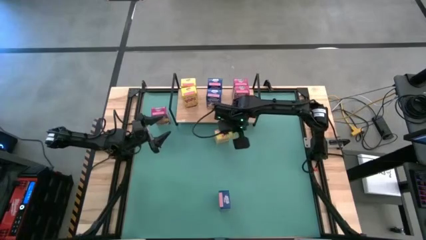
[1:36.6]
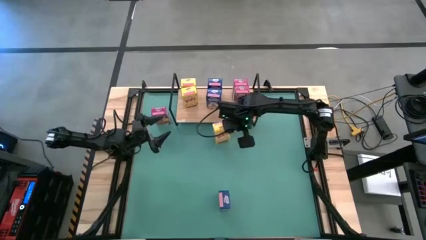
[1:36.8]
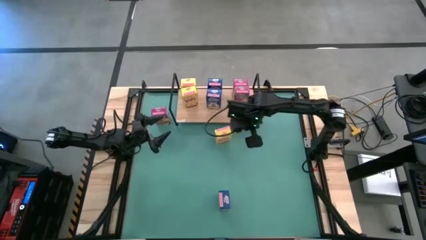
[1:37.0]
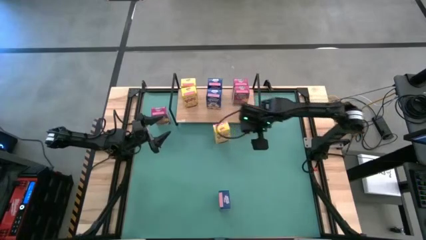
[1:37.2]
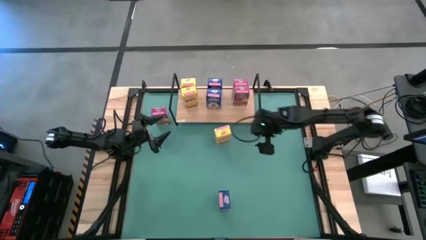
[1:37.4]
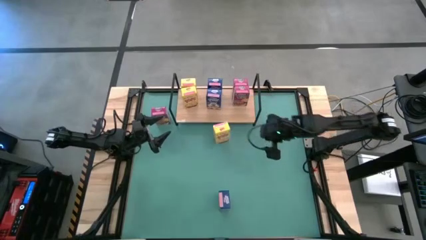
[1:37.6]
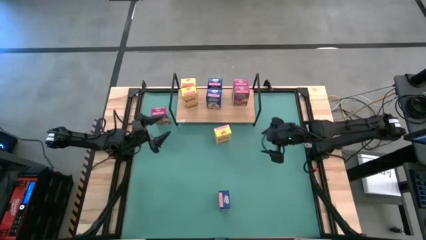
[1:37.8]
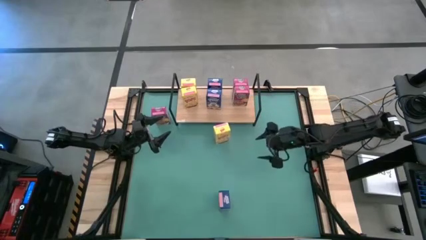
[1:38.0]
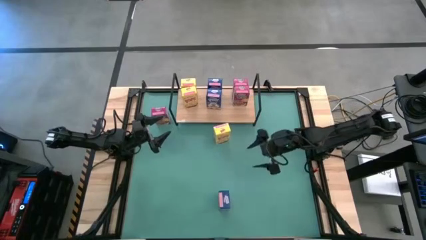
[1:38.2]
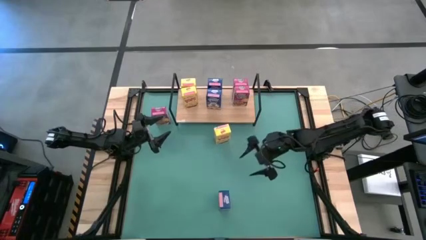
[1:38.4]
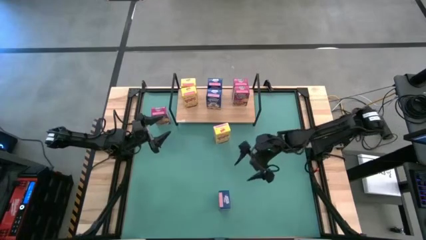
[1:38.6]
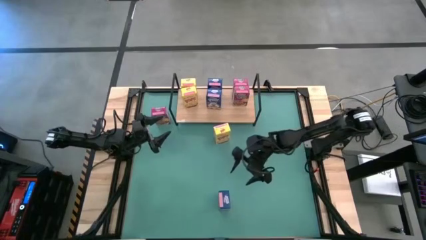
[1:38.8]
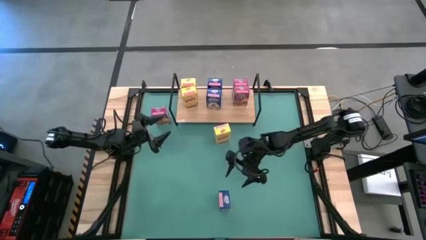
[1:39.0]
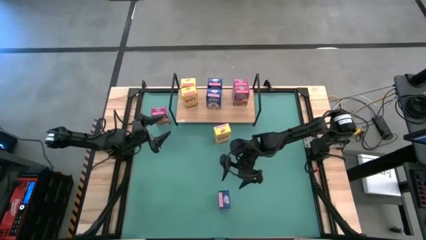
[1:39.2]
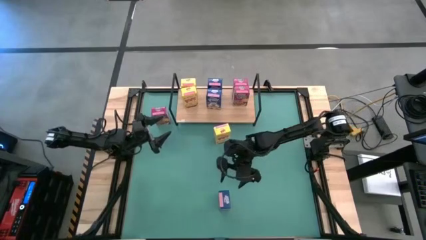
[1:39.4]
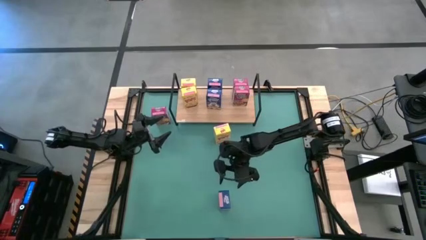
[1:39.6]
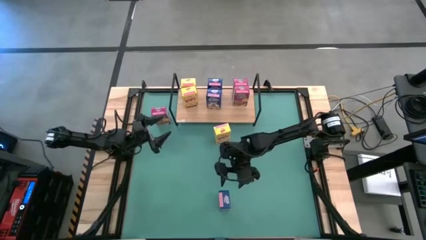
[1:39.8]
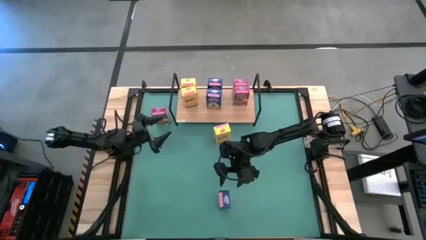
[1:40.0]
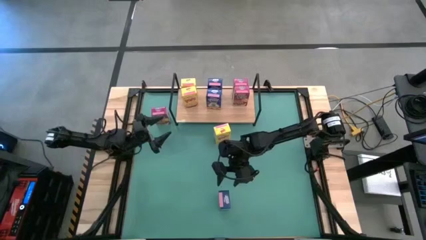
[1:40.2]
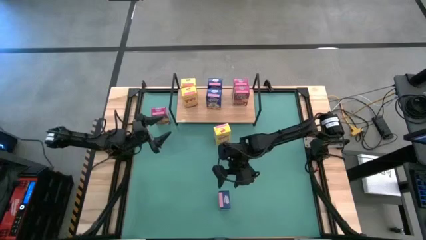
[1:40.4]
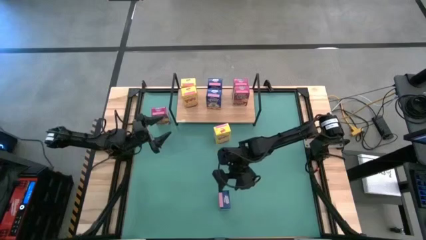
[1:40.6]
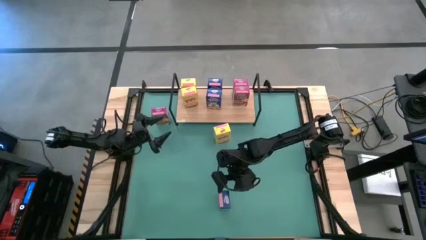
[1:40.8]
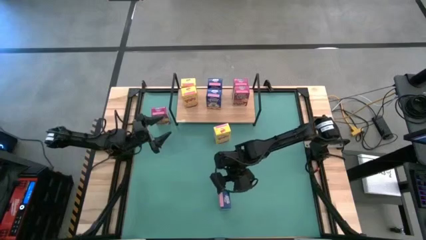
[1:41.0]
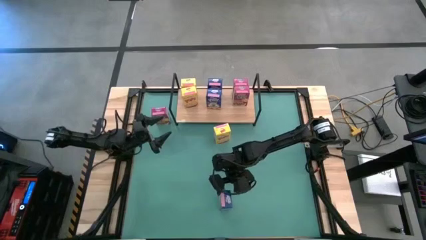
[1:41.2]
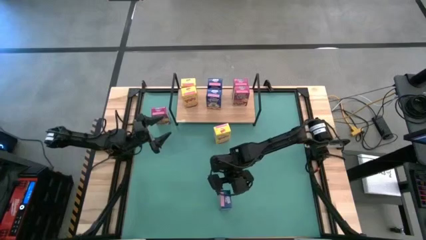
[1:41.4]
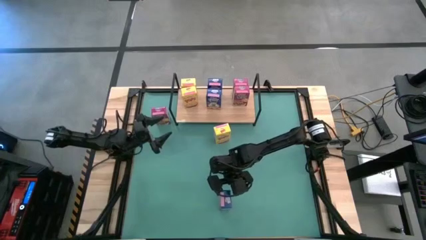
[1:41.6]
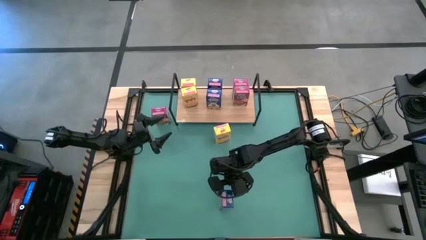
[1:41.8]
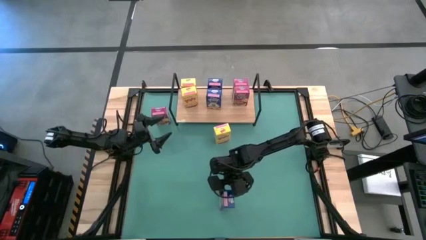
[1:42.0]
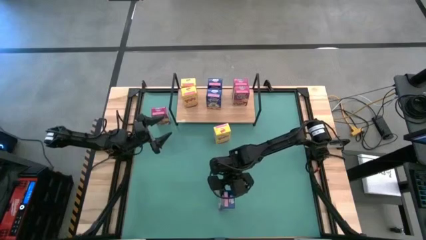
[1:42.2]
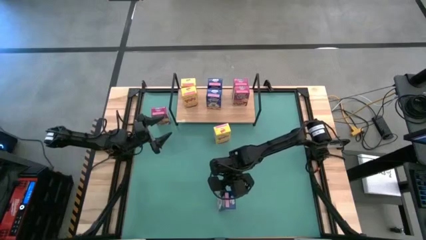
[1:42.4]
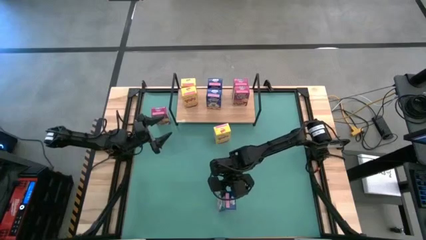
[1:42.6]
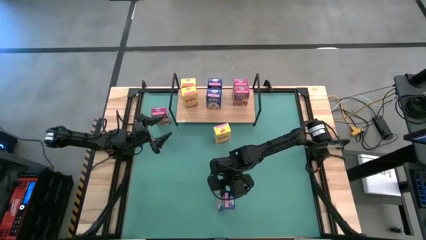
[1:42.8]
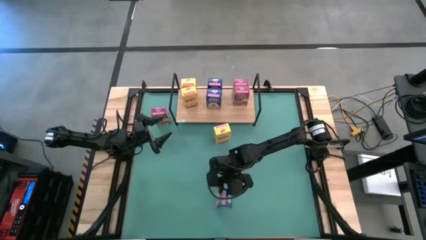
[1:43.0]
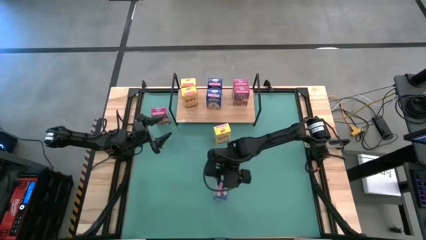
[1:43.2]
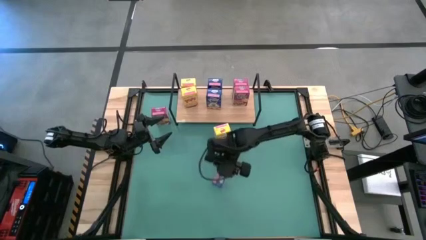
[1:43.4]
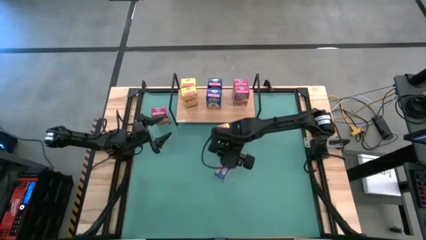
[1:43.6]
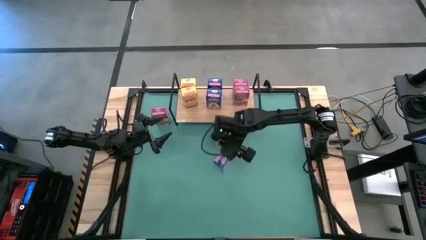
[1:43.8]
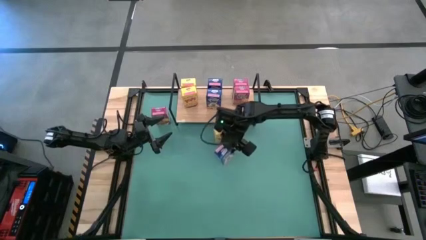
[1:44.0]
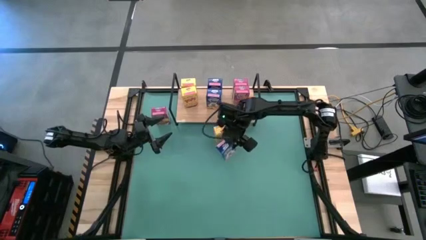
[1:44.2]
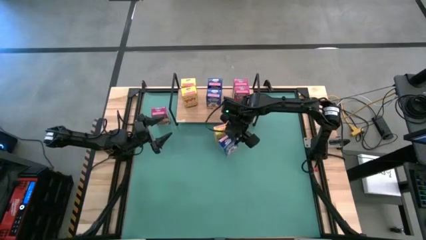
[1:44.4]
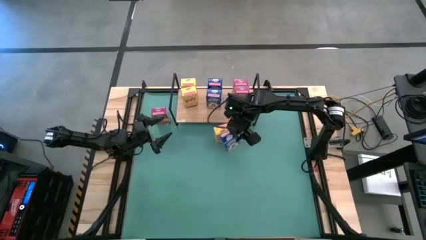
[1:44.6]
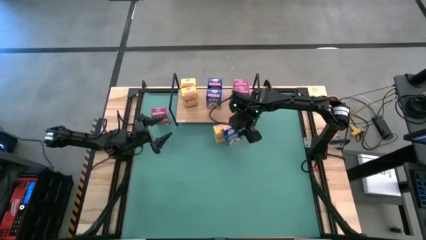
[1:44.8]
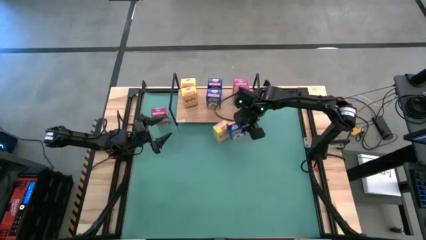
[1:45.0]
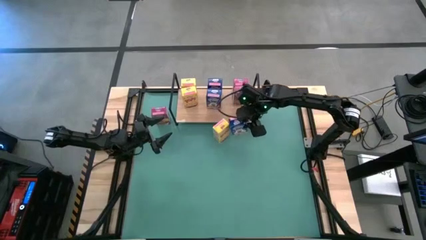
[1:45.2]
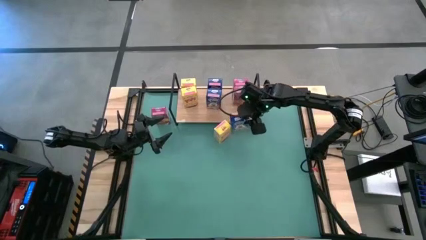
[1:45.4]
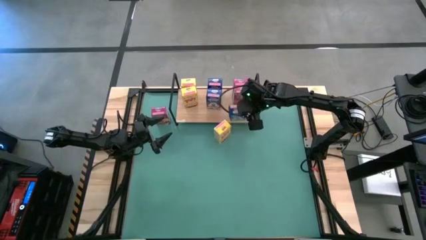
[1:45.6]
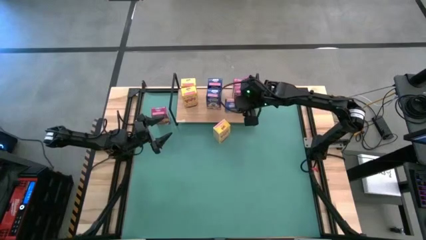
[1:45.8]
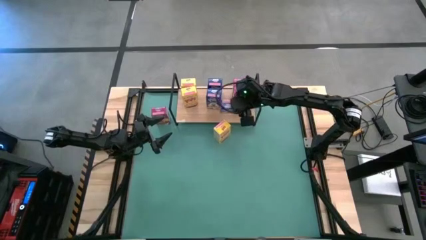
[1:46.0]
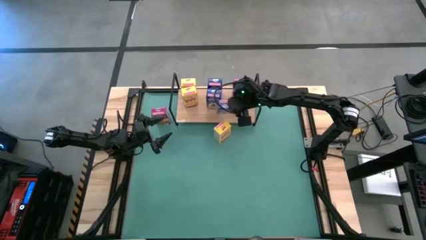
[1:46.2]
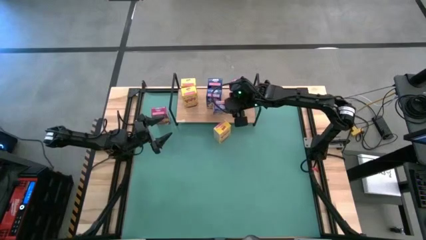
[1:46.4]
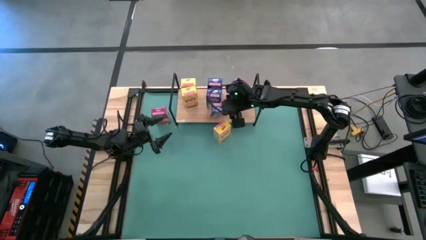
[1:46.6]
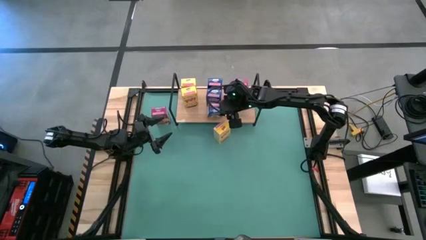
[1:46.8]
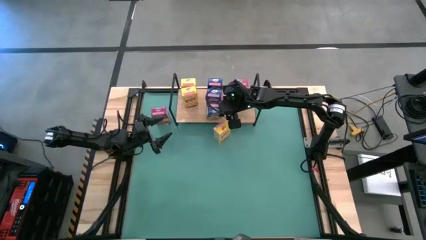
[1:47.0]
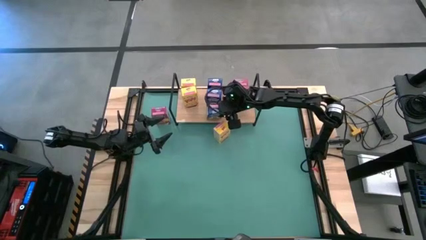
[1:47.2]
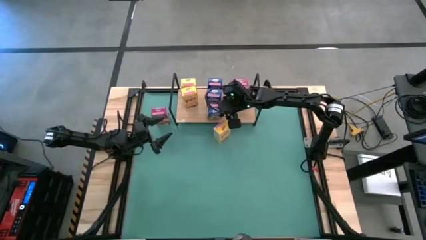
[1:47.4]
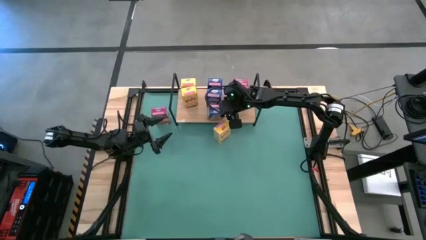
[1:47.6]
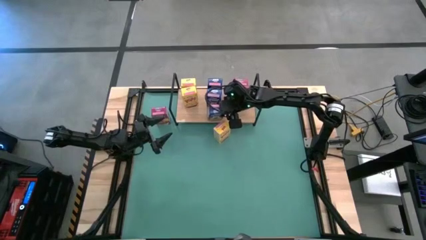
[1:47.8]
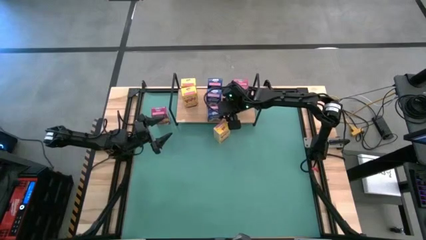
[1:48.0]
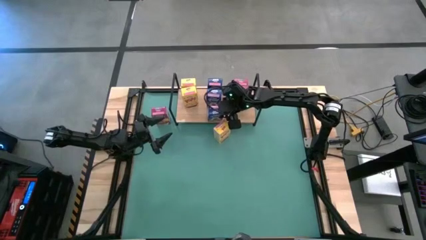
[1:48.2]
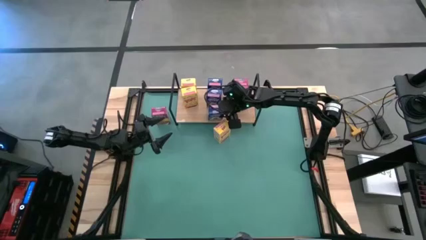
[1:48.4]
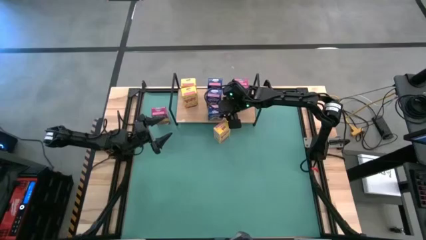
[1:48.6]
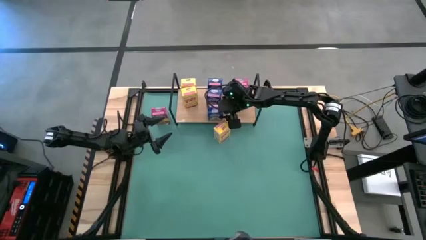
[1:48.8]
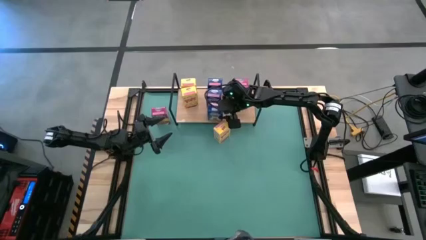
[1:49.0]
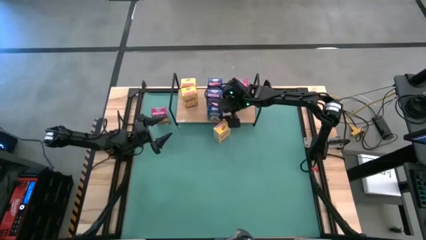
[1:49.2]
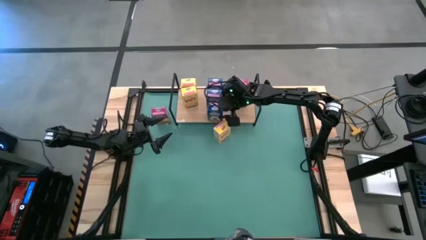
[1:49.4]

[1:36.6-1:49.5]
Task: Stack cereal on shelf
Put the blue cereal box on the shelf aligned with the other blue cereal boxes
